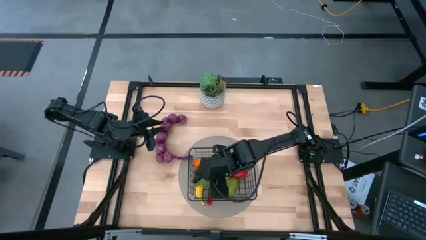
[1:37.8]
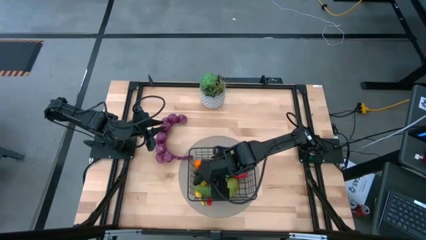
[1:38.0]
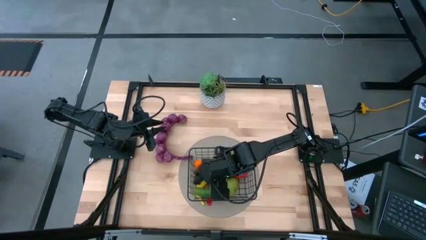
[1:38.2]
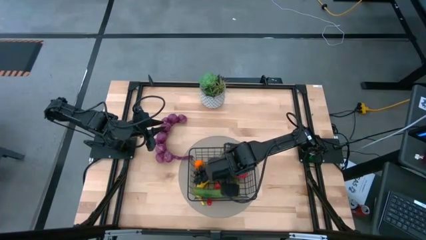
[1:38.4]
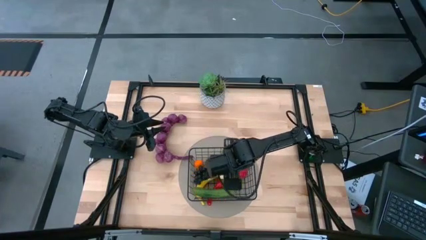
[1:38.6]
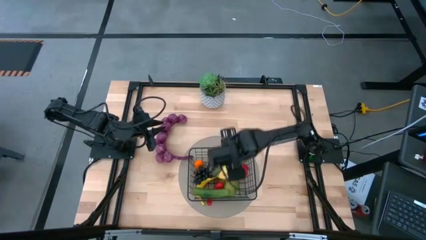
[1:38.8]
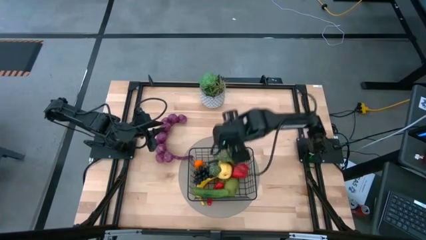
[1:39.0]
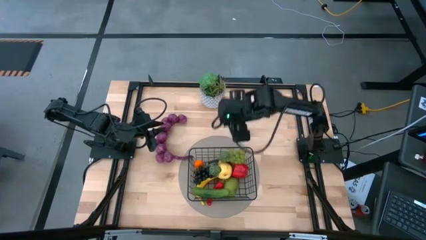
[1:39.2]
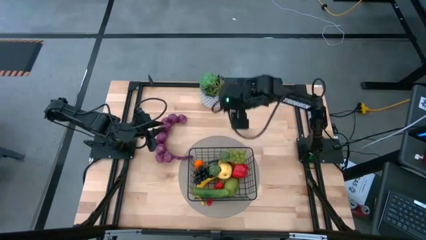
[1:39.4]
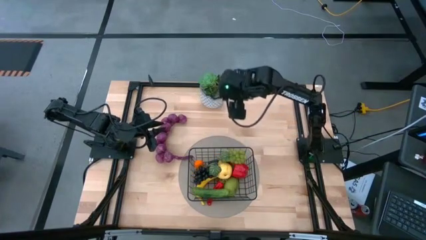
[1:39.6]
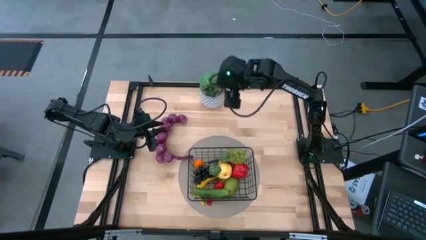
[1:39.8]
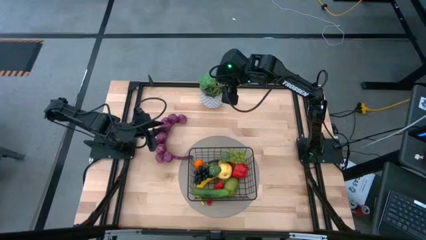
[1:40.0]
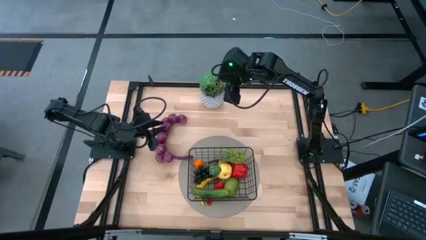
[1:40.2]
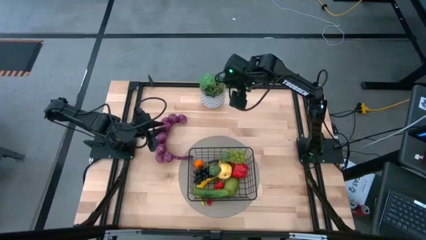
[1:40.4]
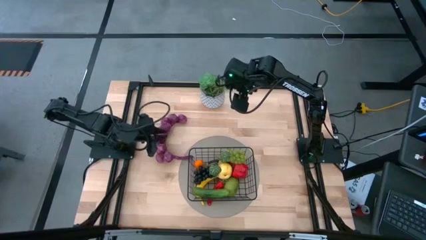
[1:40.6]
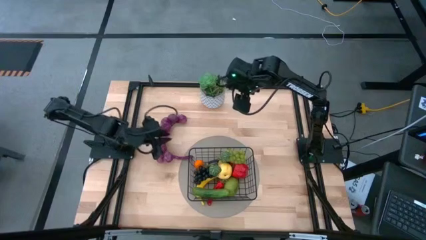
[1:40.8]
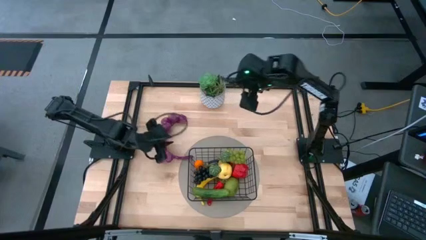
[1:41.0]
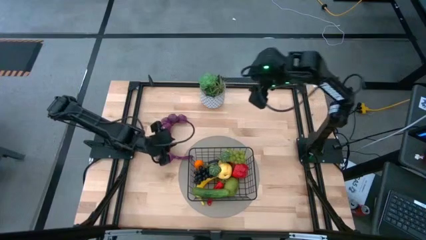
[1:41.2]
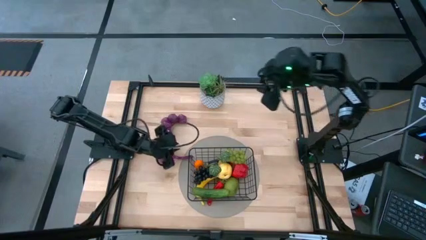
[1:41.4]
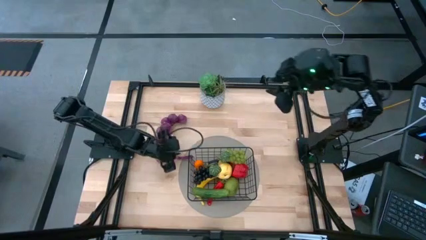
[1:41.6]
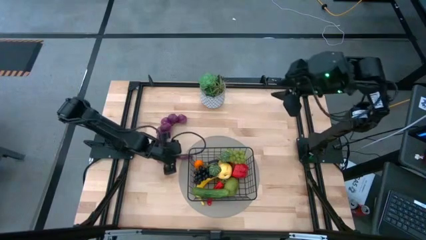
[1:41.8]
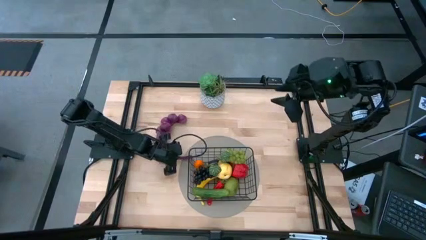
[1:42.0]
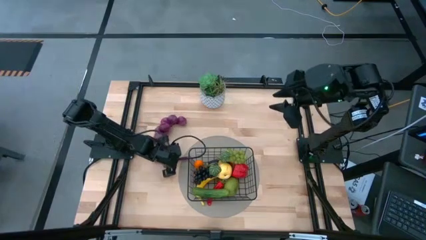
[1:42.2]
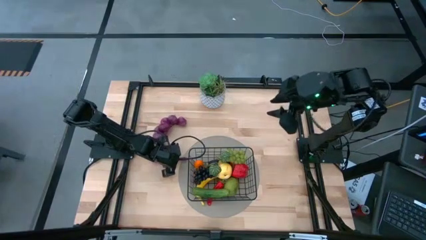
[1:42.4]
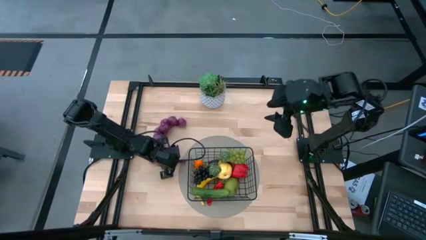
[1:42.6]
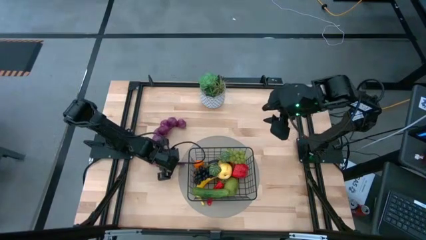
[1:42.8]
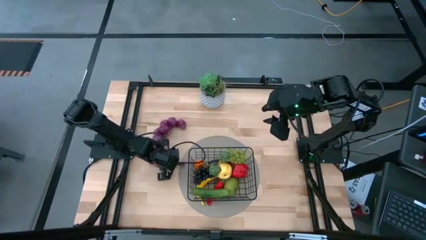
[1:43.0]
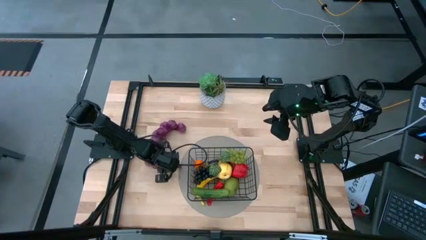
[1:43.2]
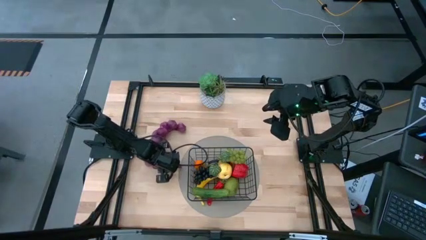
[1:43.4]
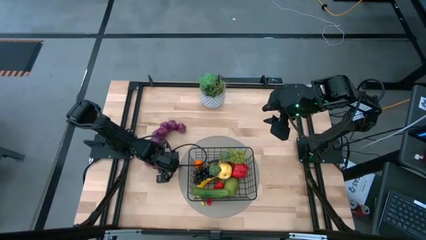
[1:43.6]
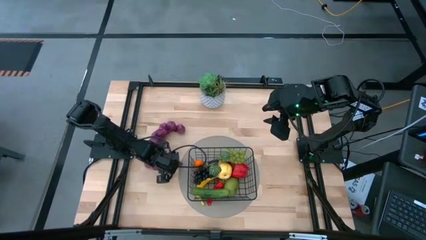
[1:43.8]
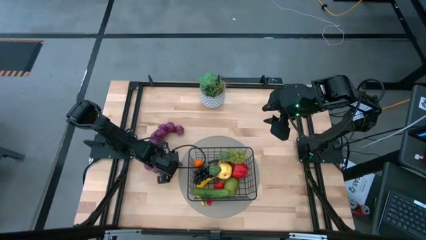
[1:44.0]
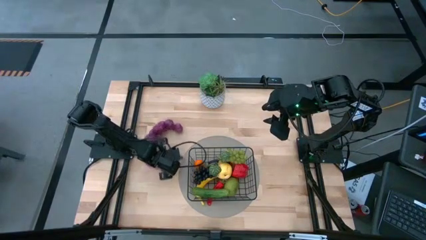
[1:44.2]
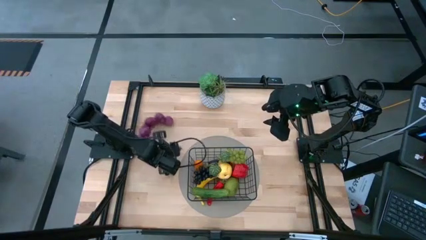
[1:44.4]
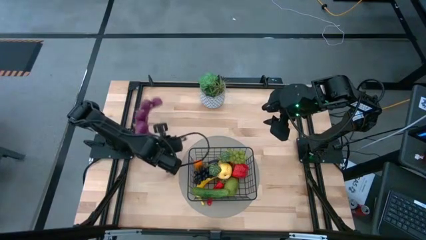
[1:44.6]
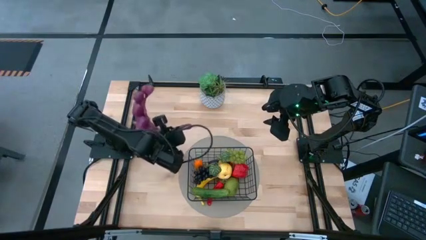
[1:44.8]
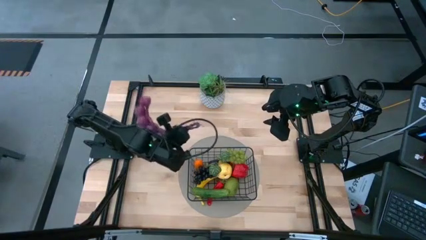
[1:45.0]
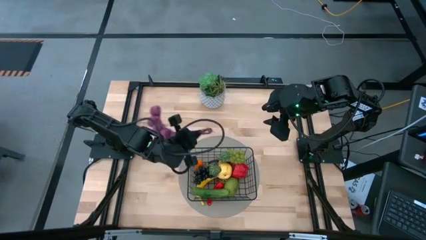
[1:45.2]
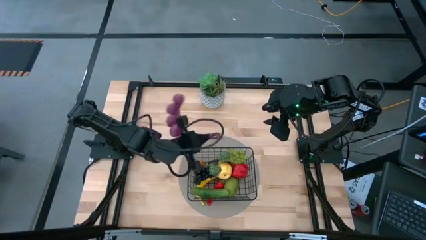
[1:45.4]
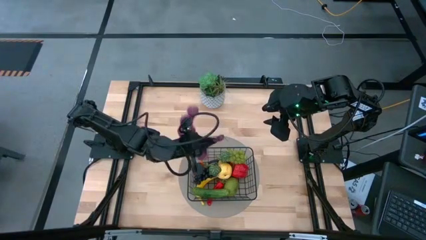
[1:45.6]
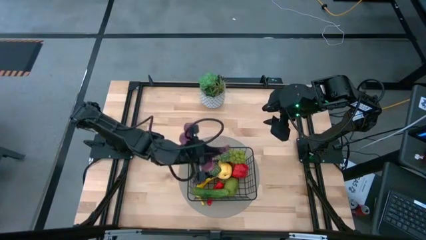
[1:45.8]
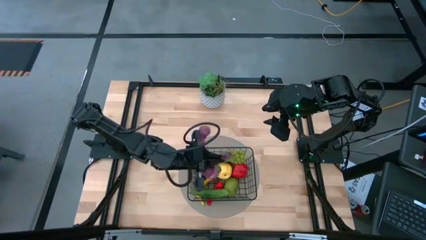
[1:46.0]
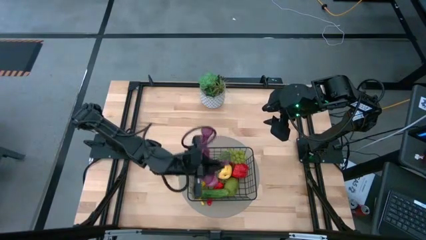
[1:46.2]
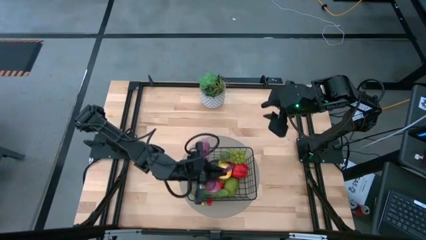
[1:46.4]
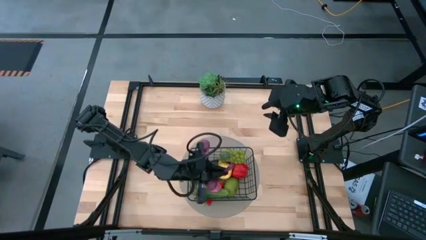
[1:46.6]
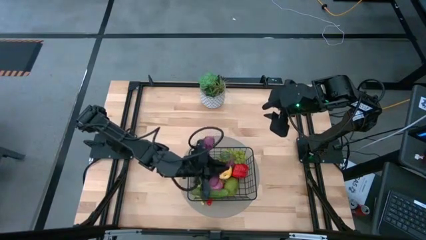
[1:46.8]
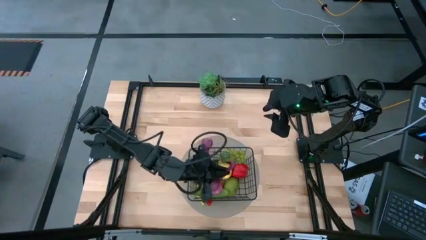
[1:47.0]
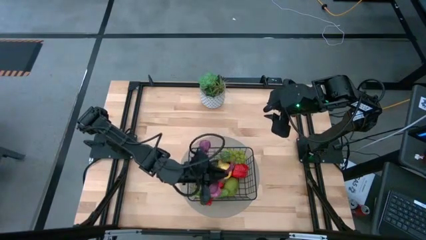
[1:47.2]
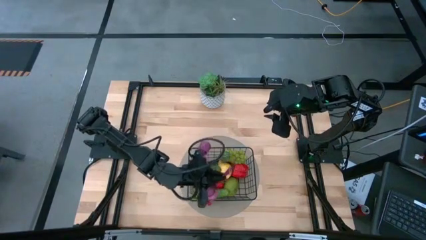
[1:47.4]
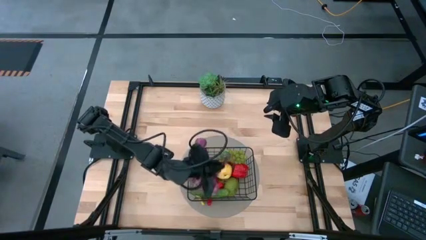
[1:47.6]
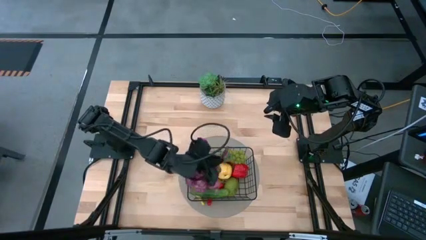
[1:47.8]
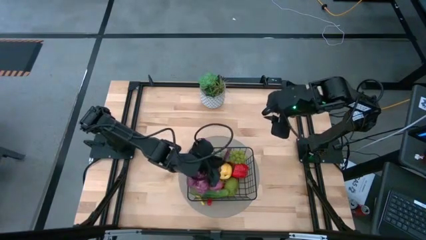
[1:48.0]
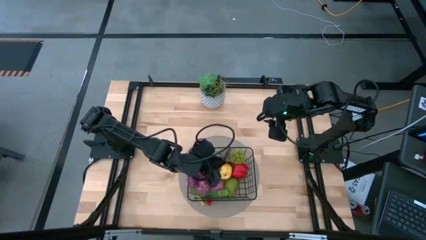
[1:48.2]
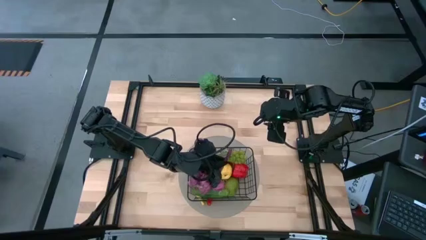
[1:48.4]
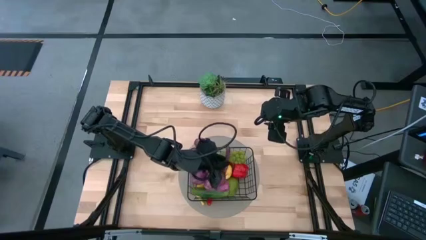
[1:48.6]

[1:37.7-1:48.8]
Task: Build produce basket
Put the purple onions into the black wire basket

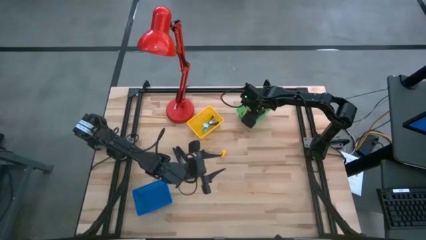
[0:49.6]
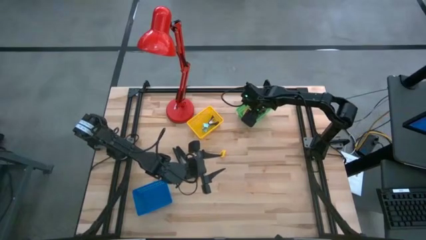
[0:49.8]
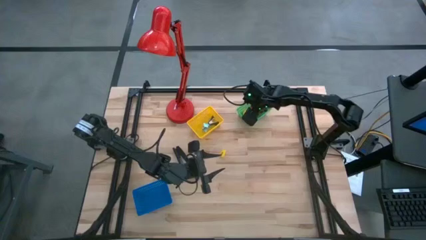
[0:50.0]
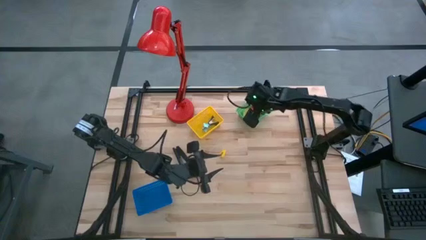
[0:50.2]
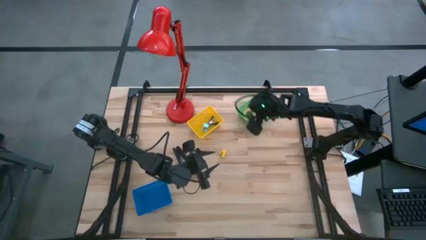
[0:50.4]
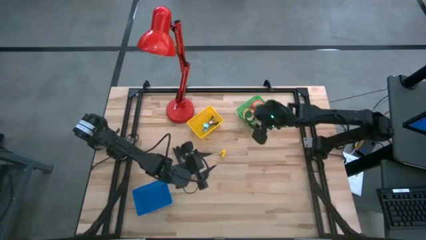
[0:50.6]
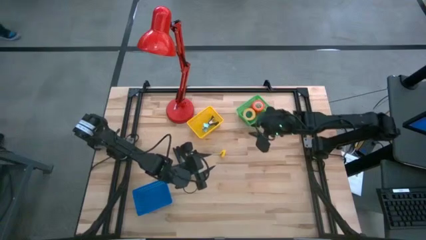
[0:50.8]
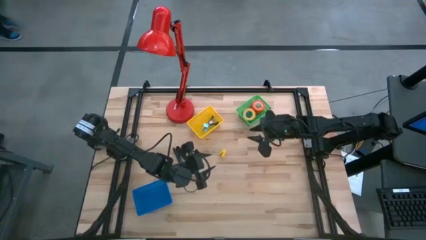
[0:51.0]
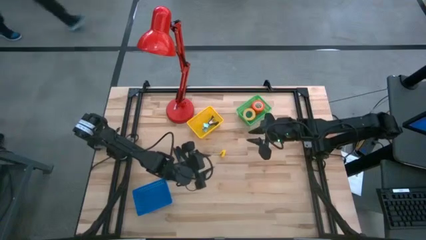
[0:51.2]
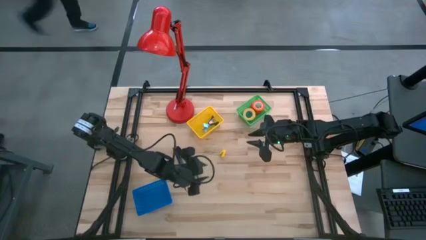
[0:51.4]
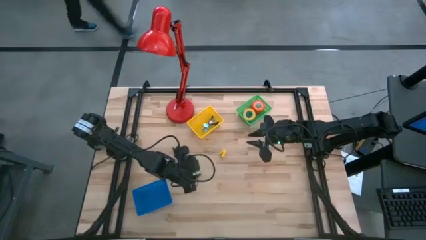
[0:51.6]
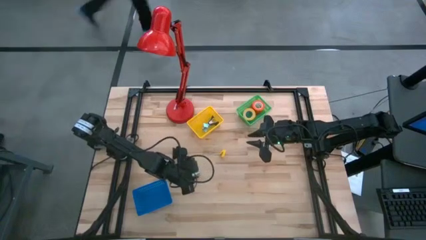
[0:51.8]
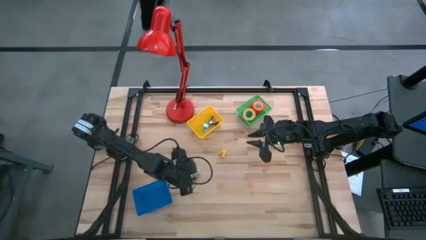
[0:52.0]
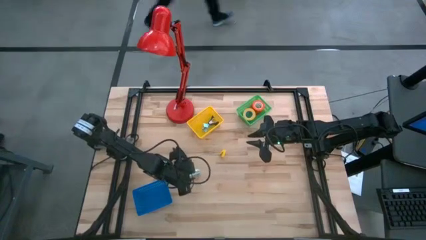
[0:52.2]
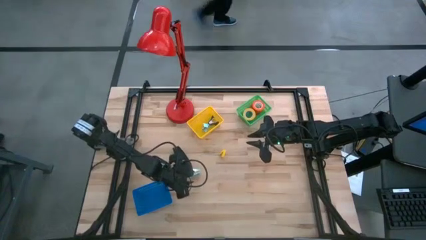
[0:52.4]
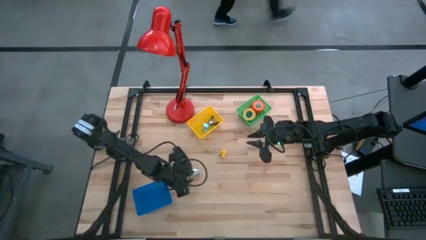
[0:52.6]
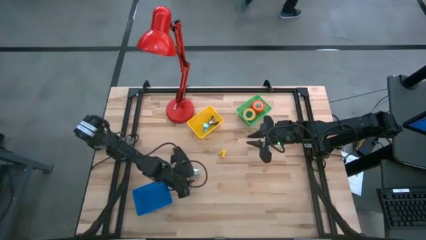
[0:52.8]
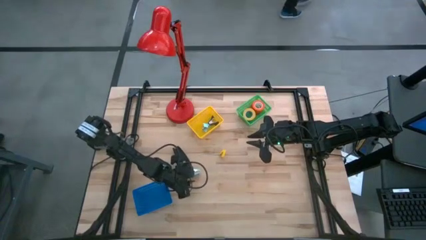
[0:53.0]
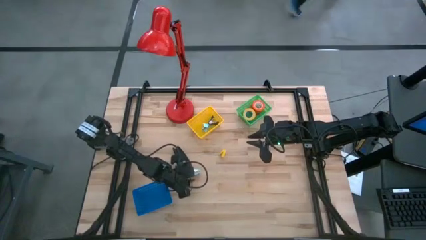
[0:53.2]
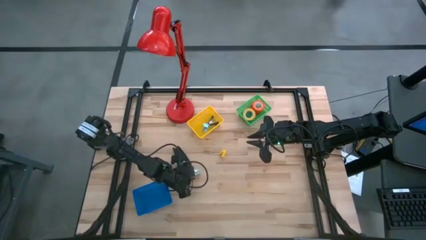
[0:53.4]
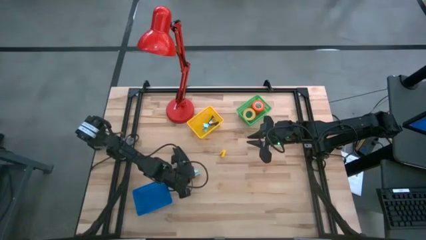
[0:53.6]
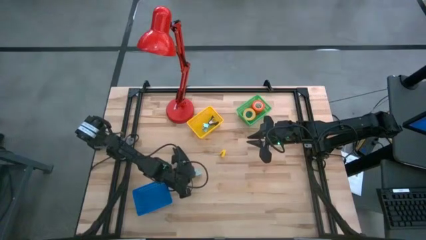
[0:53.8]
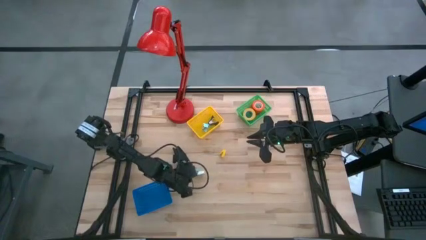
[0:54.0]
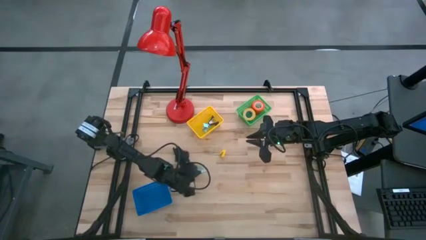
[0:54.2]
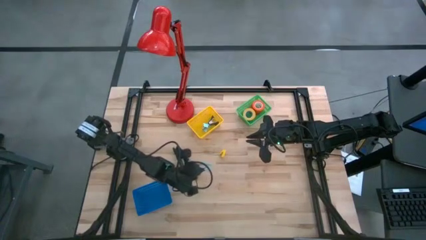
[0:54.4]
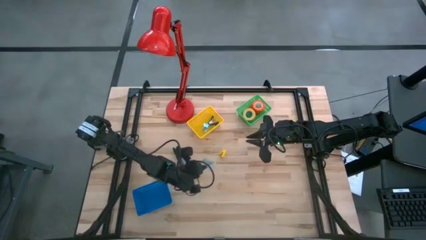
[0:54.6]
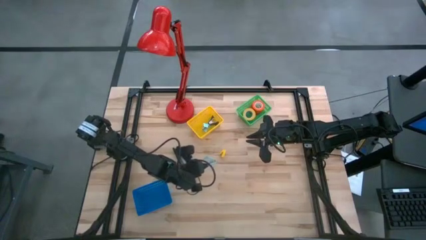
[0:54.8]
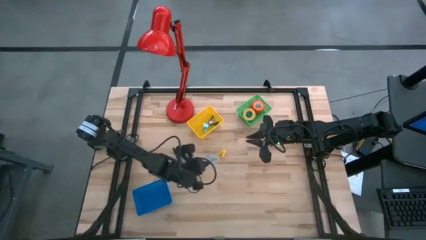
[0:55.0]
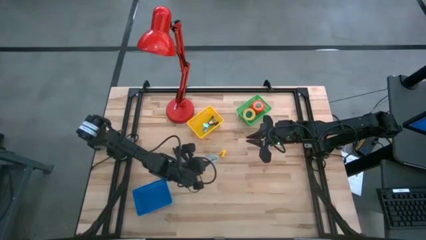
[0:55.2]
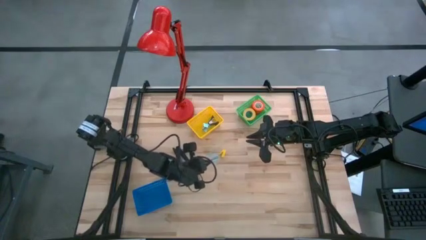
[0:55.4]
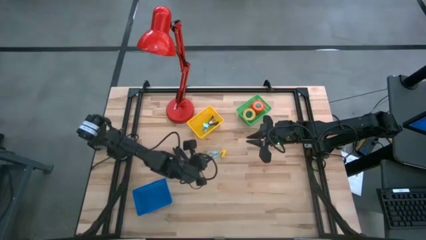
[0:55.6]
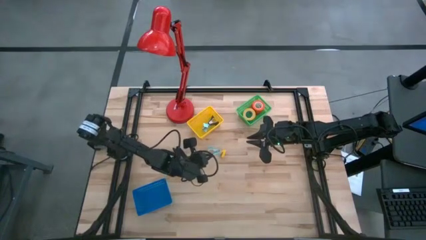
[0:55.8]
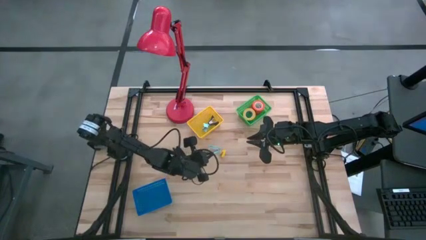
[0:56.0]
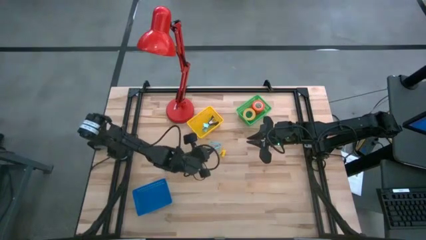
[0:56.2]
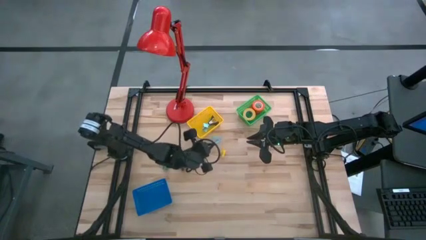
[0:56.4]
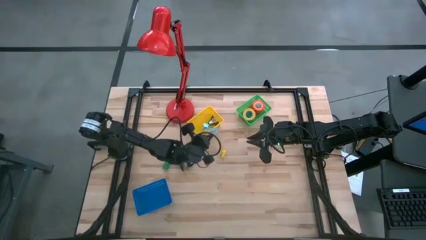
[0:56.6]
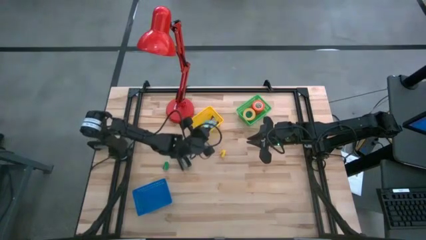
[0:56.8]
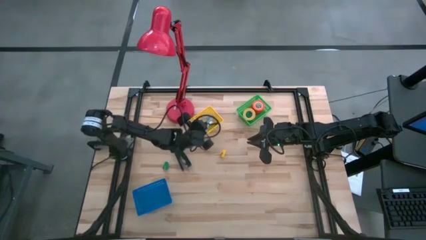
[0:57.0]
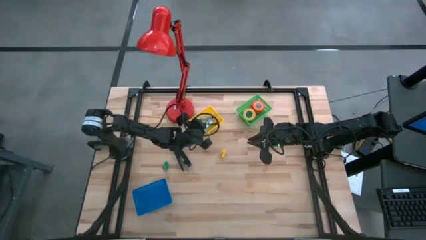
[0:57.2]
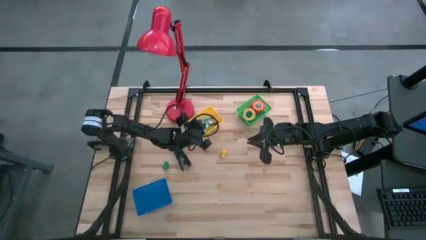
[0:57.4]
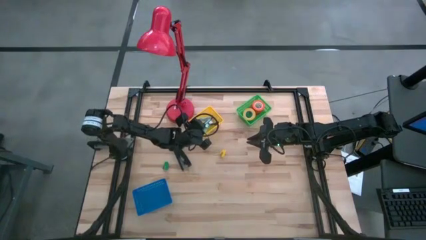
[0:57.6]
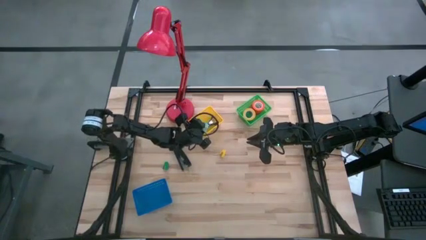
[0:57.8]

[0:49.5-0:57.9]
Task: Pick and place Stapler, Stapler remover, tape
Put the blue staple remover into the yellow bin
